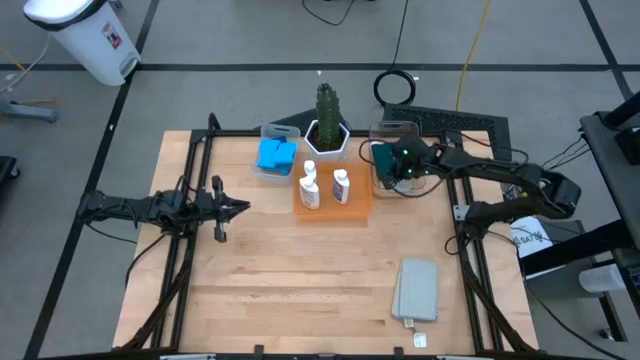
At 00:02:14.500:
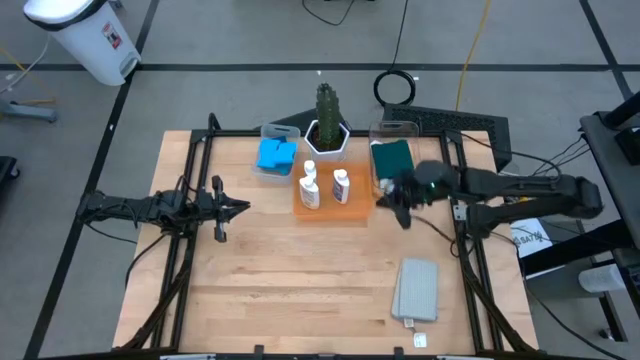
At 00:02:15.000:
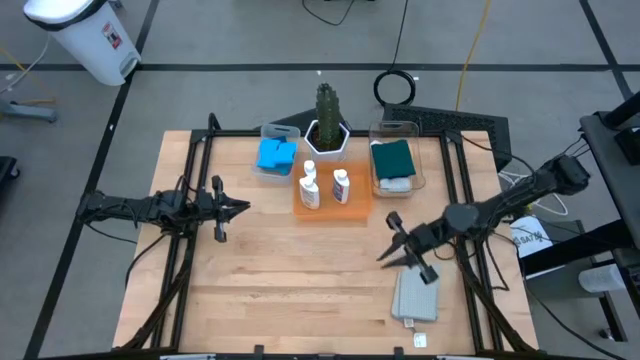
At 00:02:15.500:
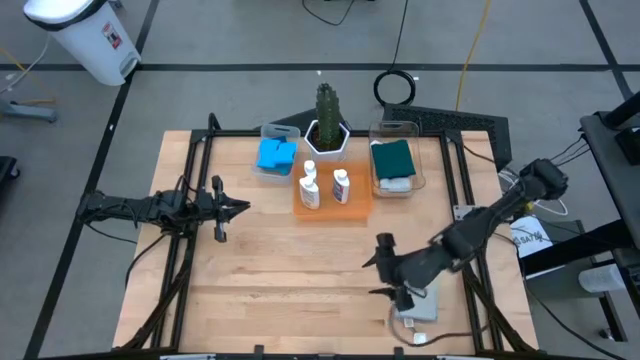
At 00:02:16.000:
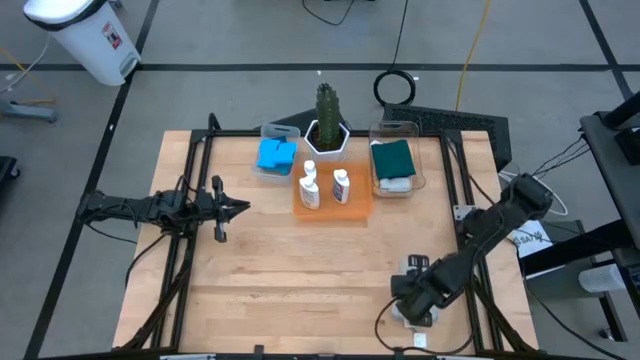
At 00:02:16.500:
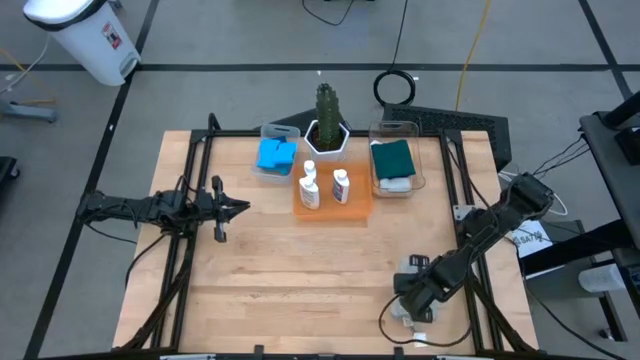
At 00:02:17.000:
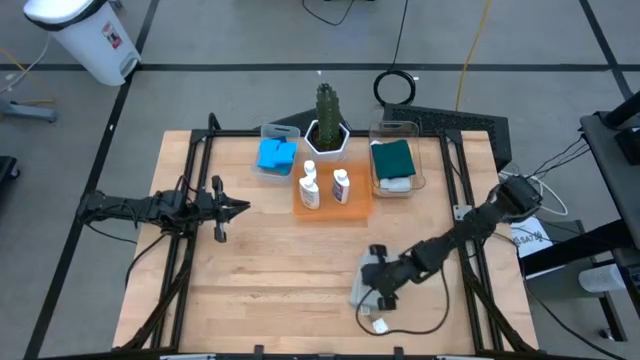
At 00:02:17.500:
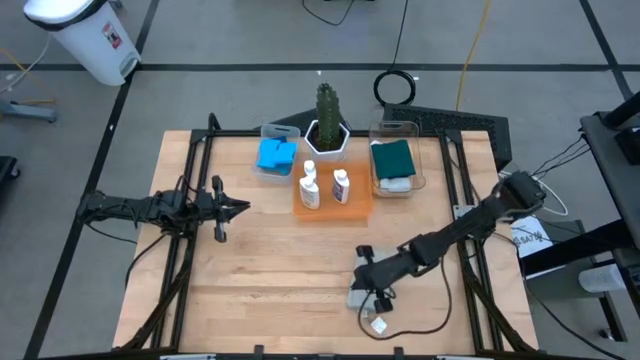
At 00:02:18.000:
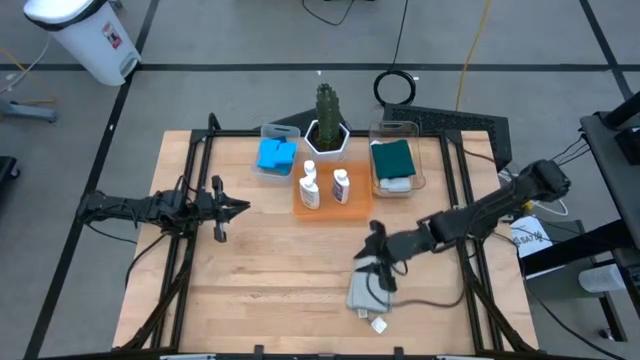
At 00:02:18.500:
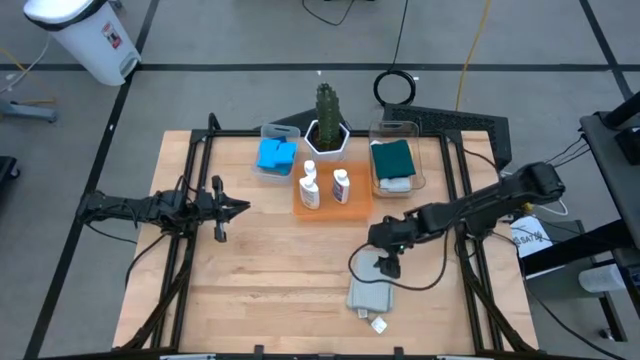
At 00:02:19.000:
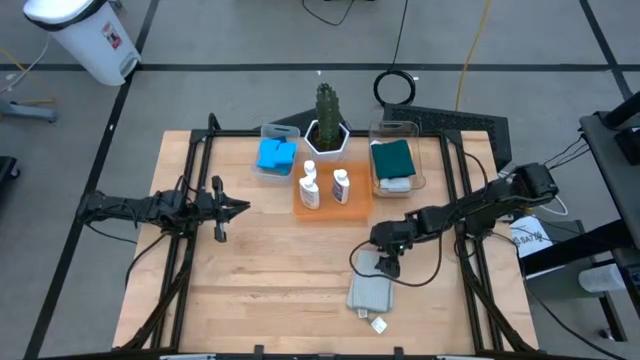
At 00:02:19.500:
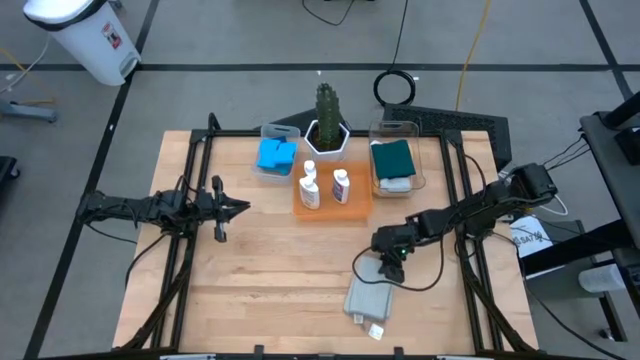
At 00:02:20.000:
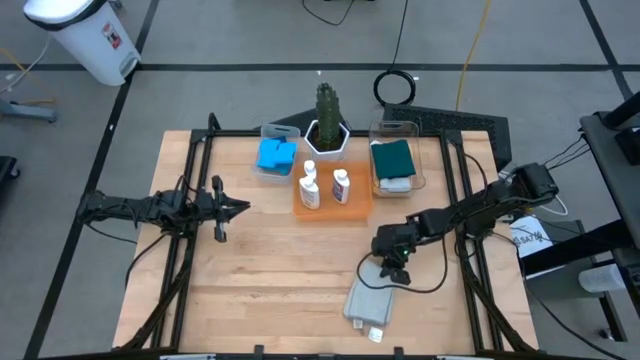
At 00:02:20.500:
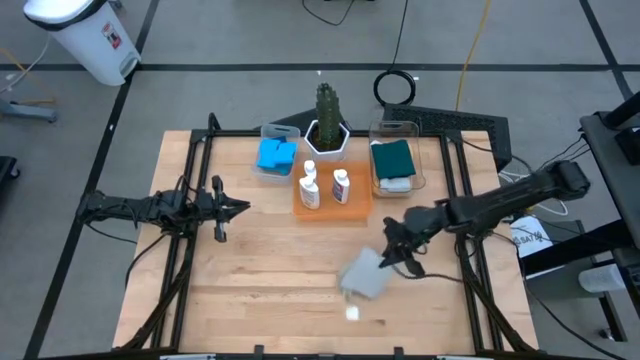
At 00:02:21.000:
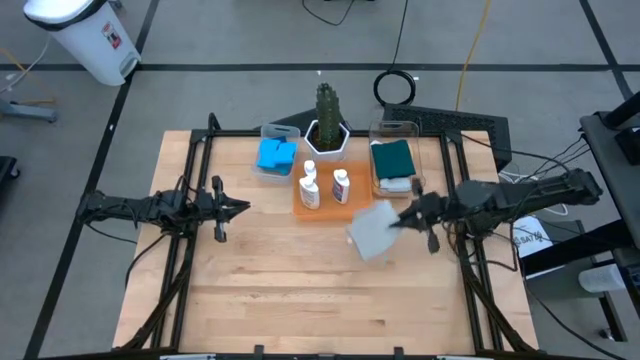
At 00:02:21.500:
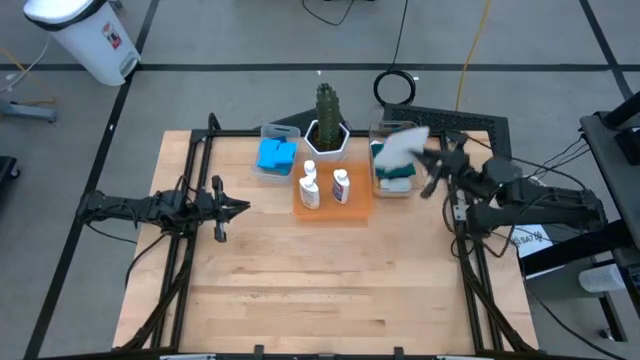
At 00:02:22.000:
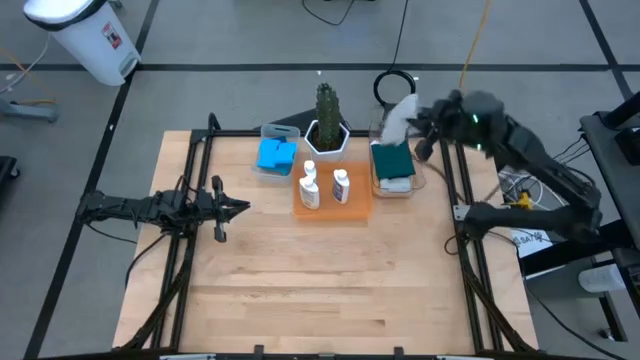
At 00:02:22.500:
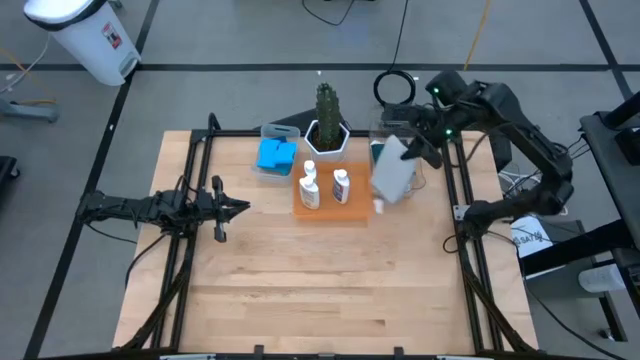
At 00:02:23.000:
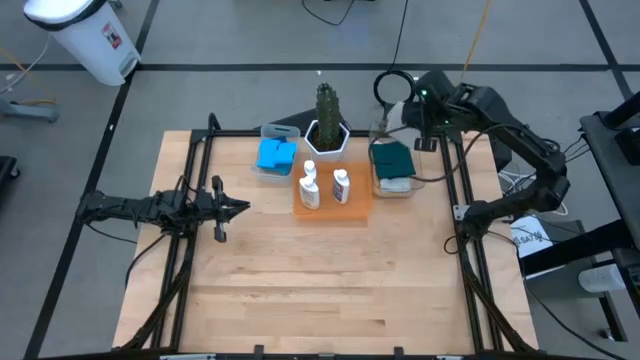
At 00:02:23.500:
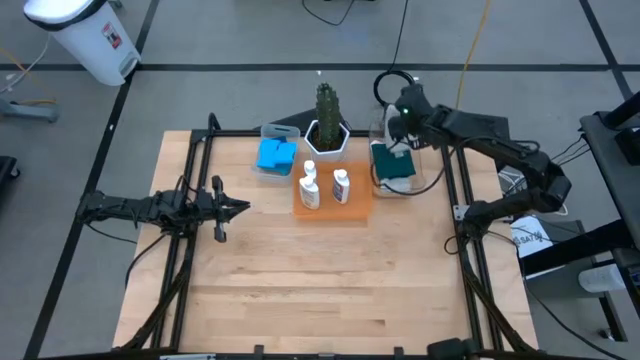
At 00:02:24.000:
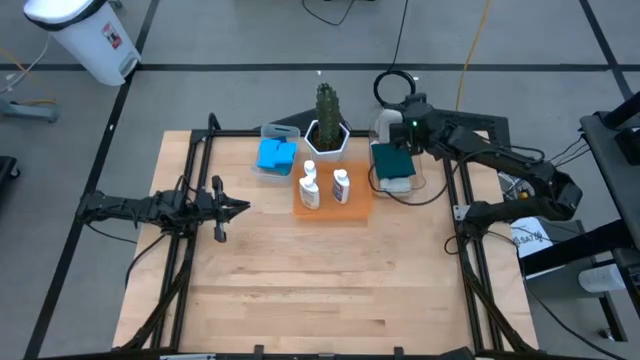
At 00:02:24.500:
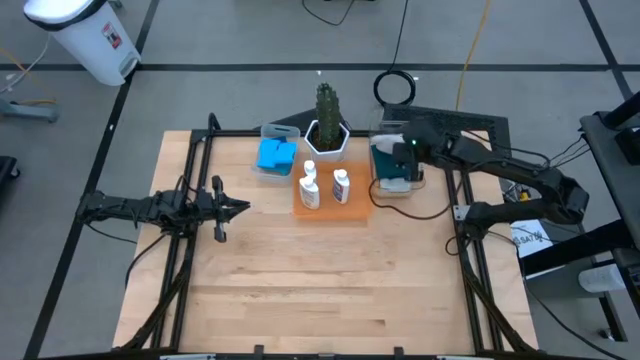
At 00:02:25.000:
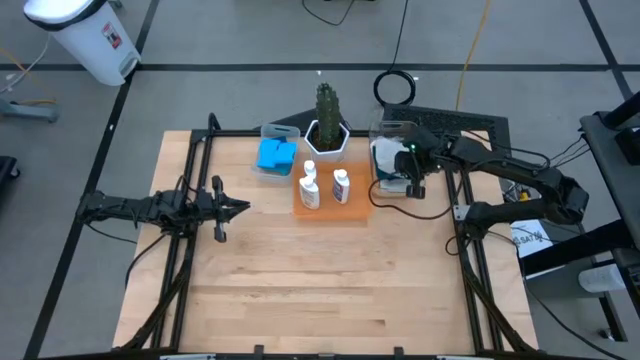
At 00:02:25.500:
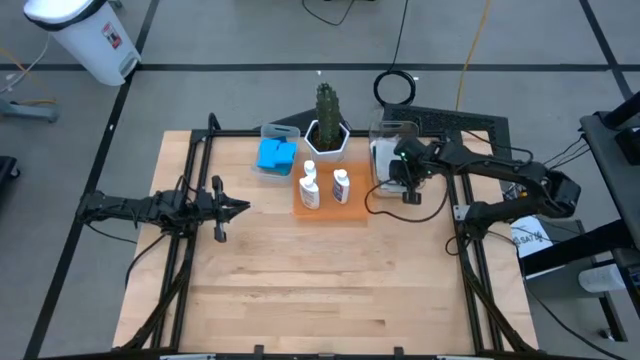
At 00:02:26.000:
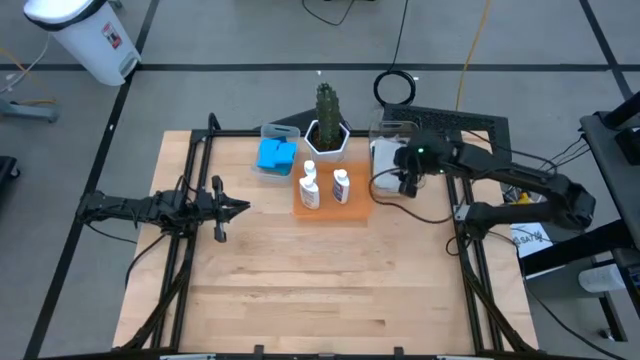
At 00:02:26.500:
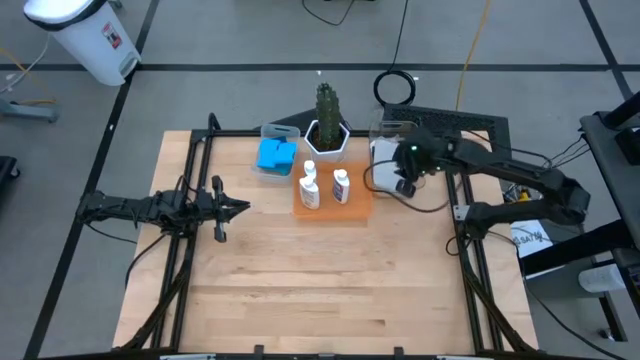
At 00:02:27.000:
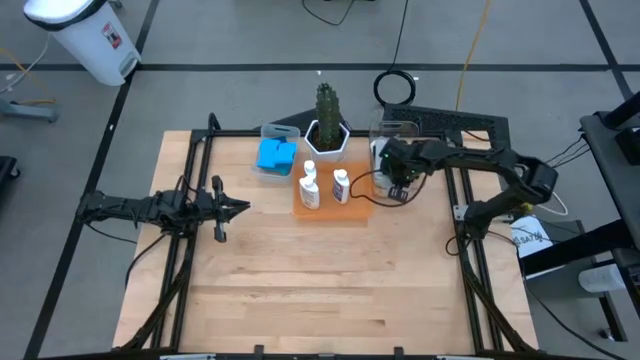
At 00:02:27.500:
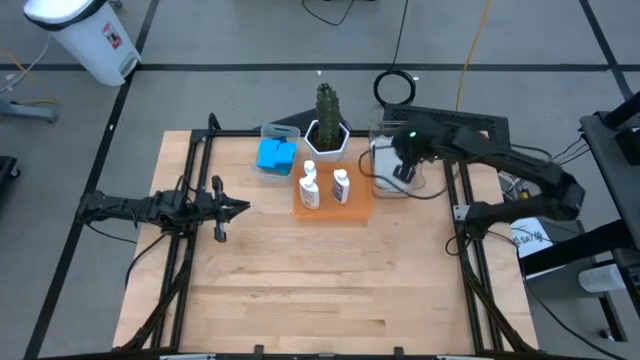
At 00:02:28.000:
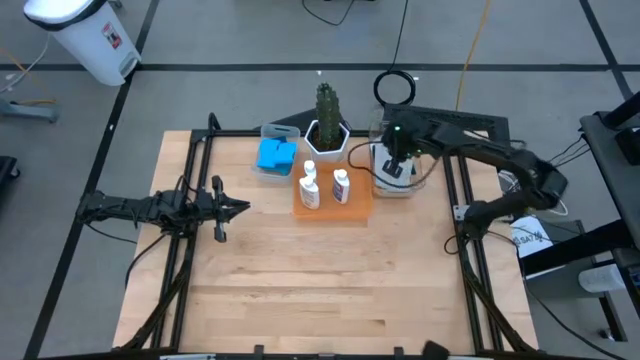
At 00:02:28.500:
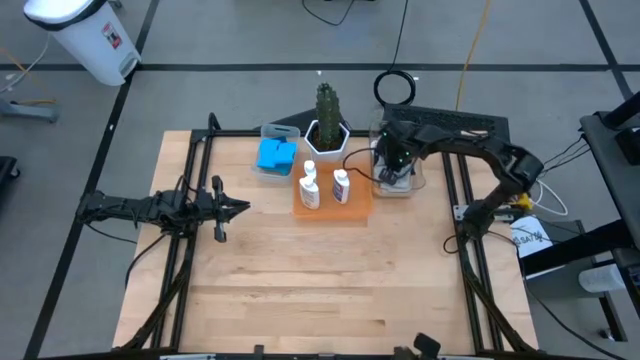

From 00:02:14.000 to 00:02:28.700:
Task: Pick & Place Kitchen Items
Put the gray microfiber towel into the transparent bin

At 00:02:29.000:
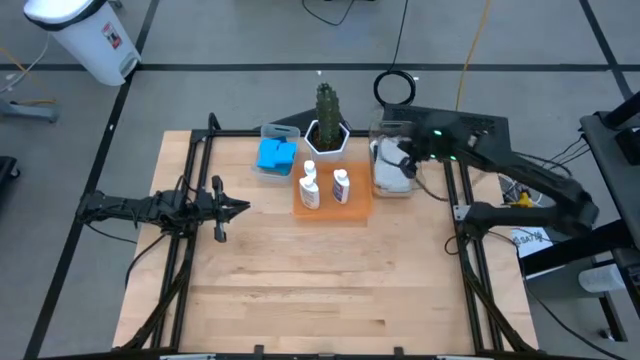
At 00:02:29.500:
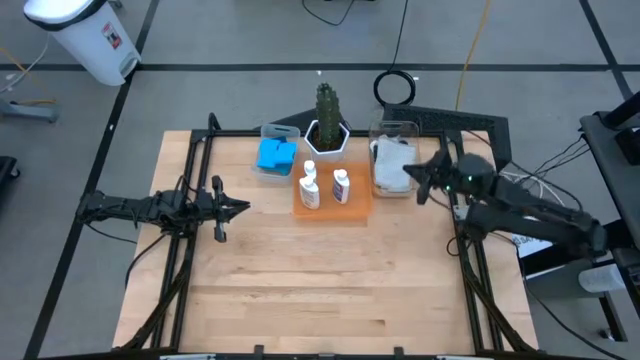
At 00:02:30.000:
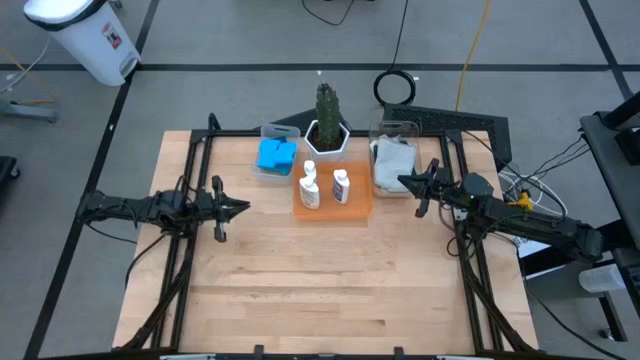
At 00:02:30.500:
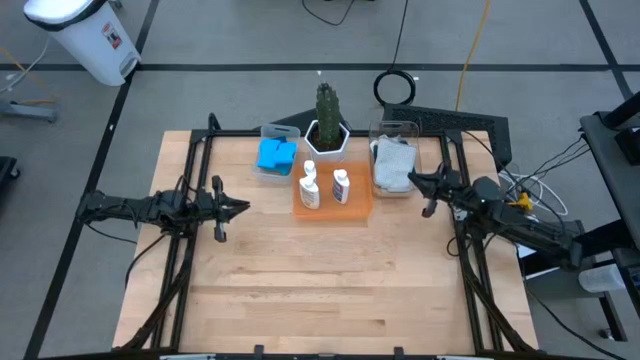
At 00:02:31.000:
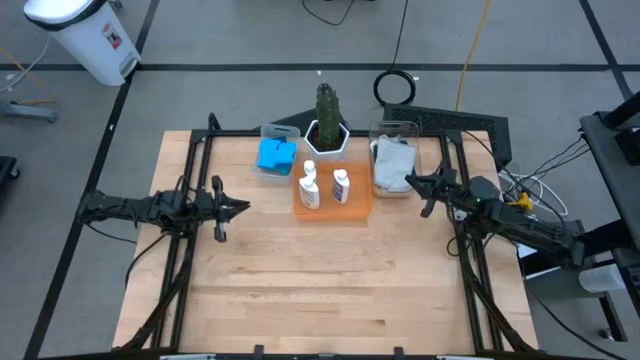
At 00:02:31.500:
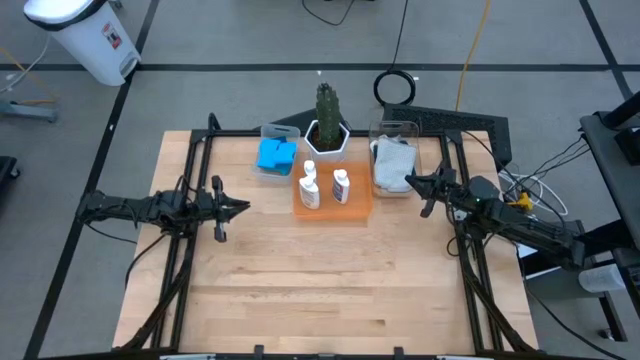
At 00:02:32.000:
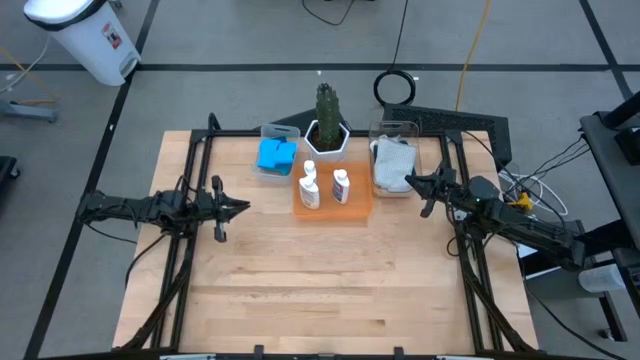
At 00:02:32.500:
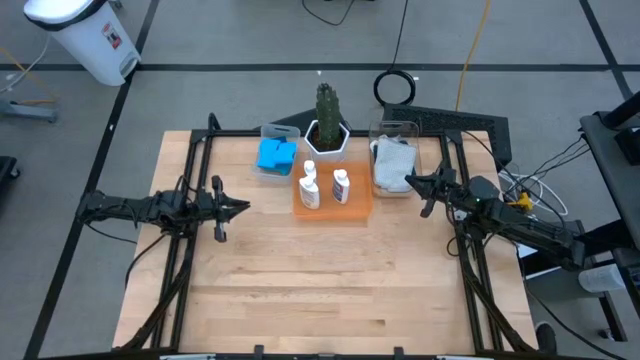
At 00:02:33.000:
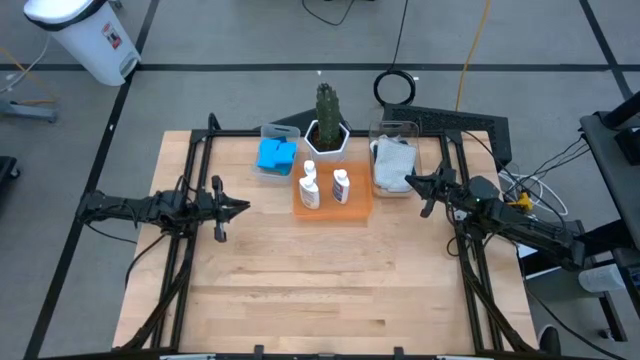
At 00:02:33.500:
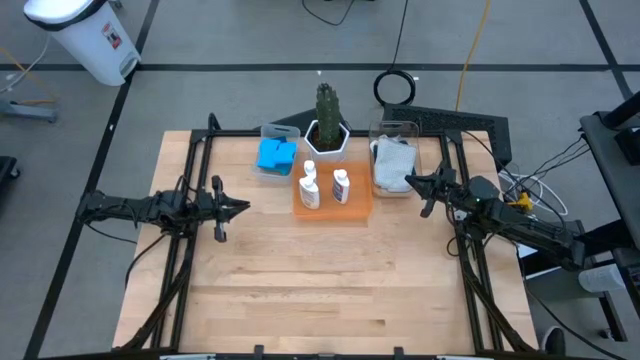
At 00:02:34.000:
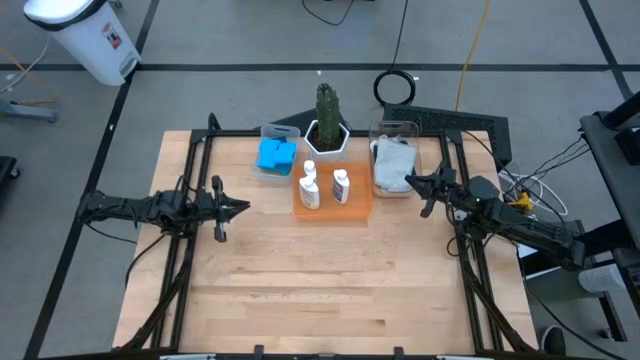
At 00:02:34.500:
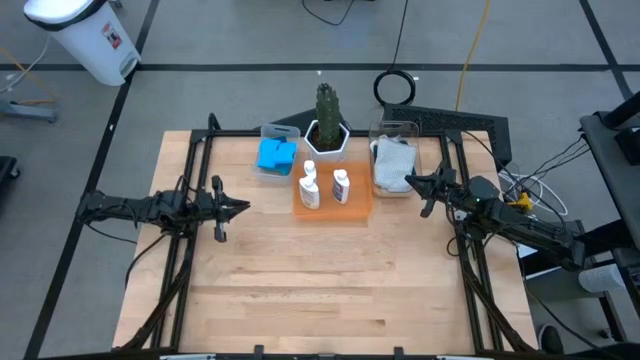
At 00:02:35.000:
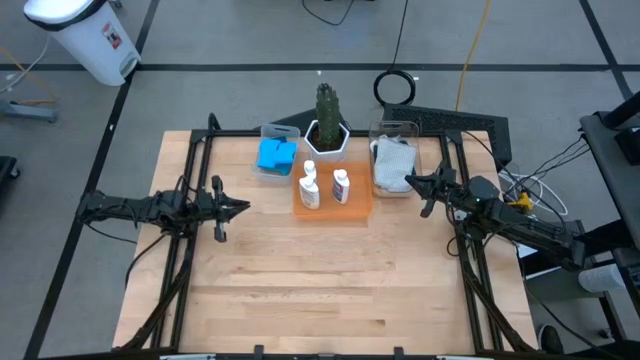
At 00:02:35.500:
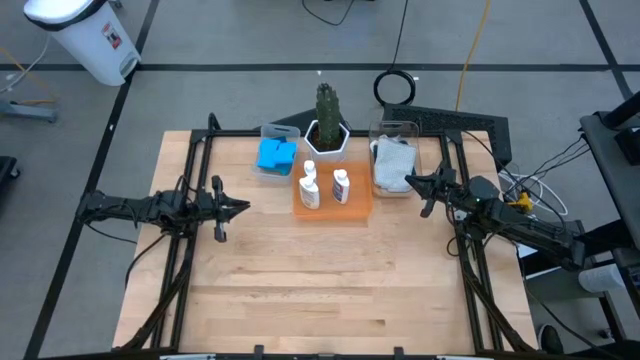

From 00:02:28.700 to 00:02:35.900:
Return to Home Position
